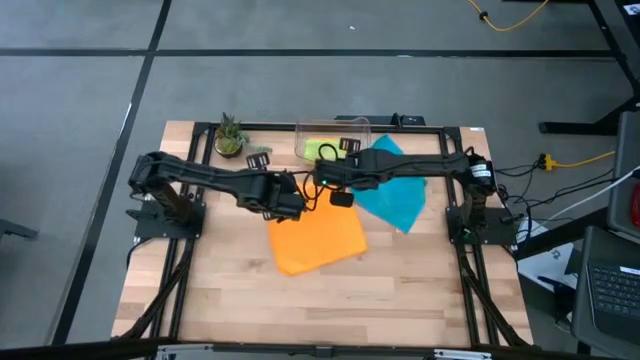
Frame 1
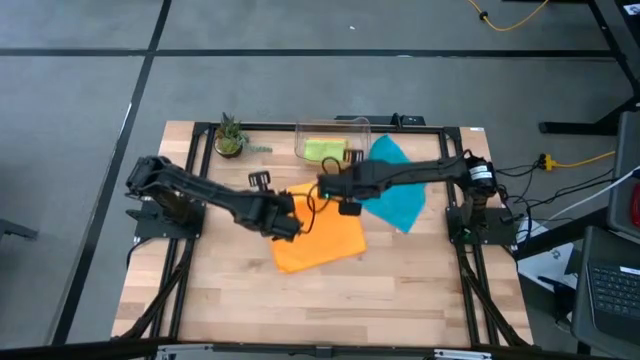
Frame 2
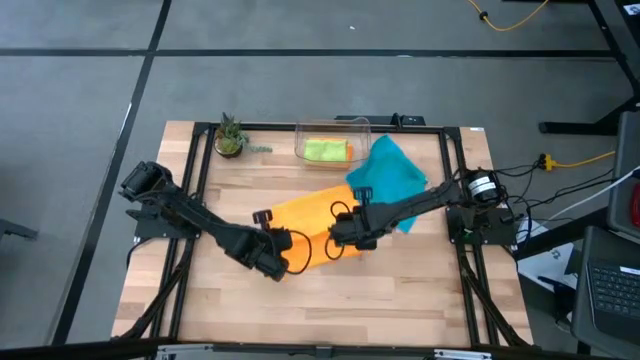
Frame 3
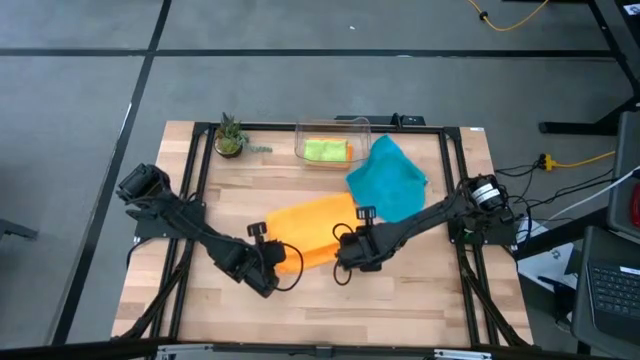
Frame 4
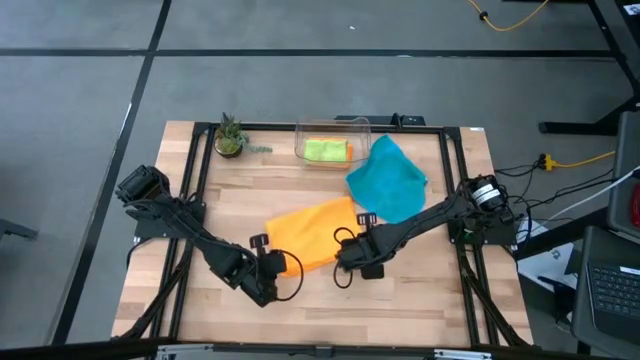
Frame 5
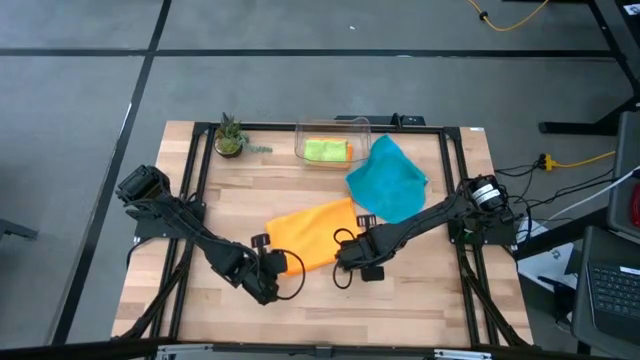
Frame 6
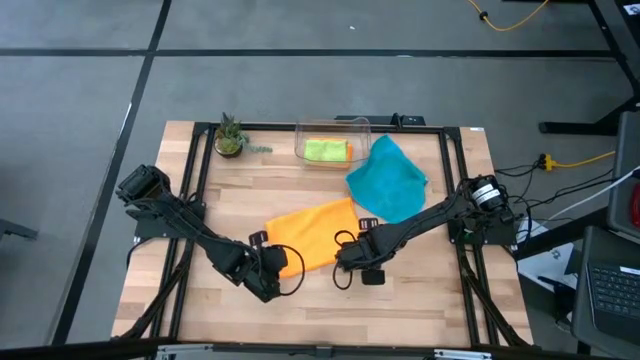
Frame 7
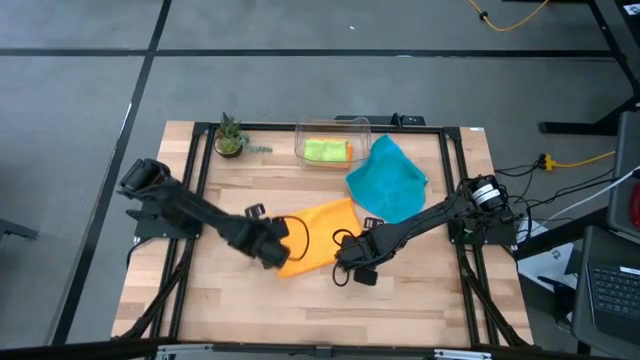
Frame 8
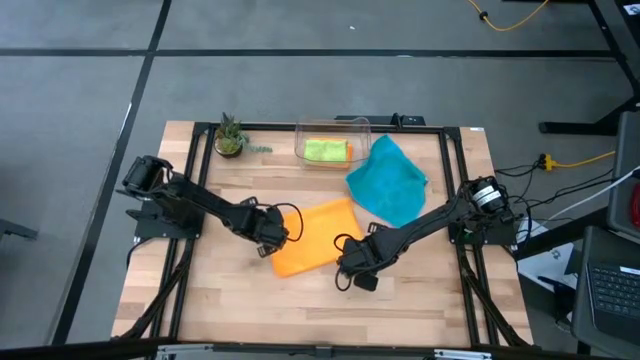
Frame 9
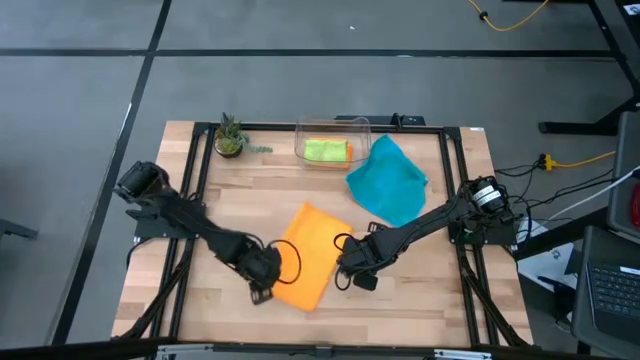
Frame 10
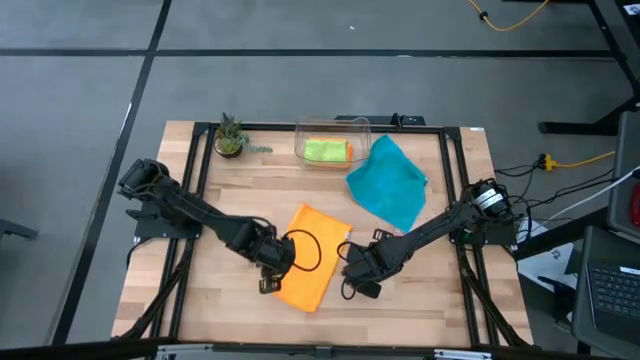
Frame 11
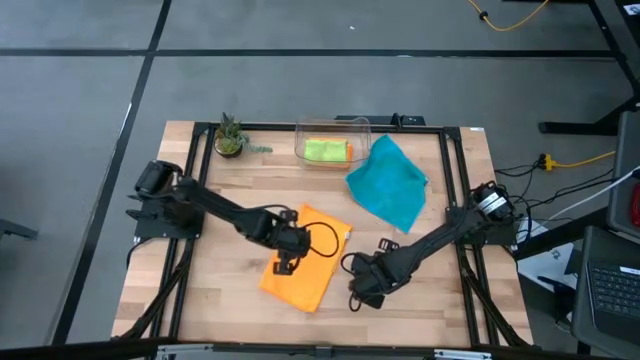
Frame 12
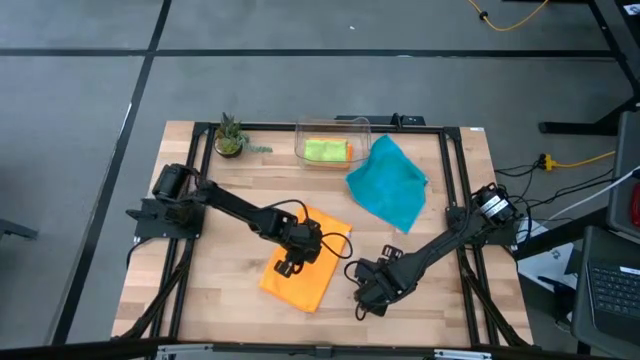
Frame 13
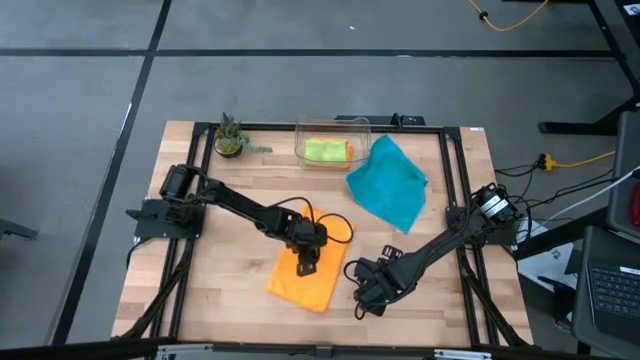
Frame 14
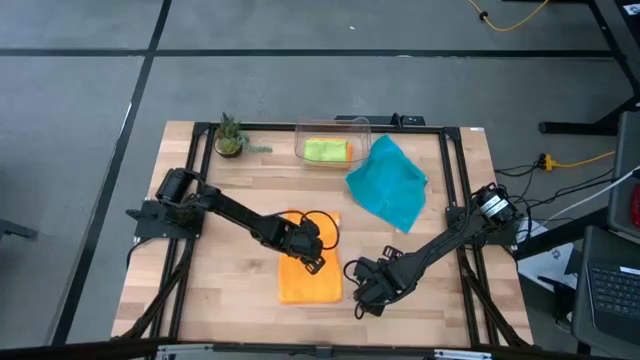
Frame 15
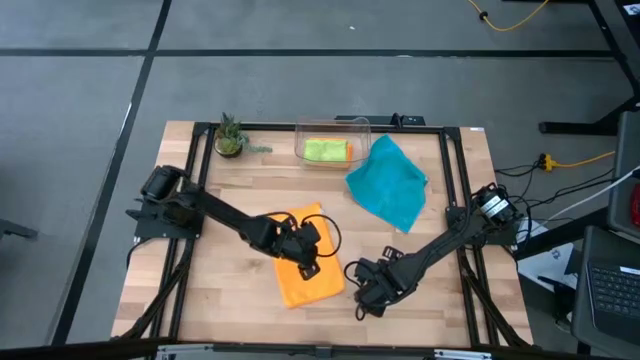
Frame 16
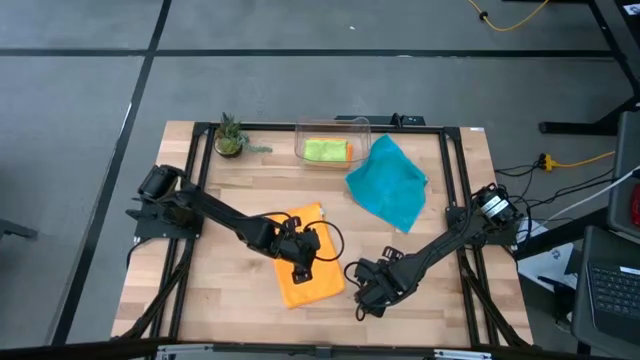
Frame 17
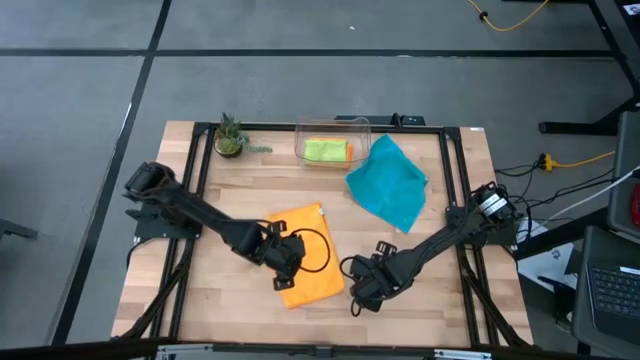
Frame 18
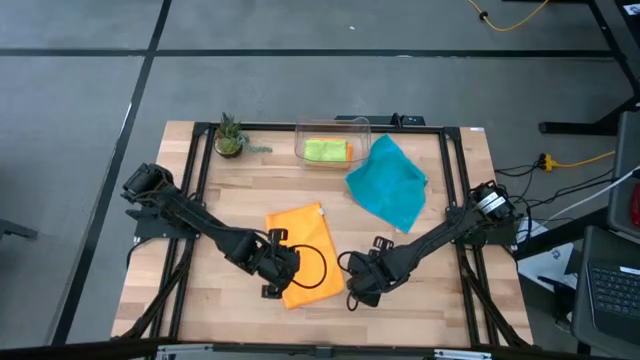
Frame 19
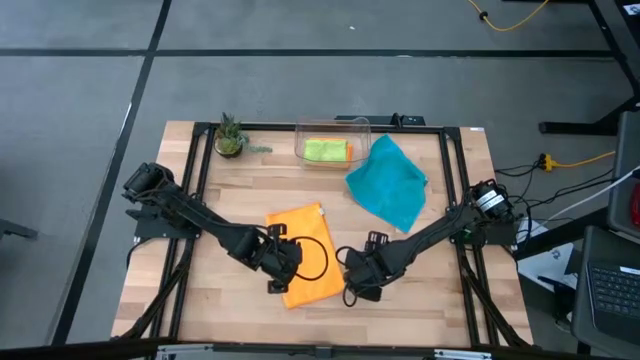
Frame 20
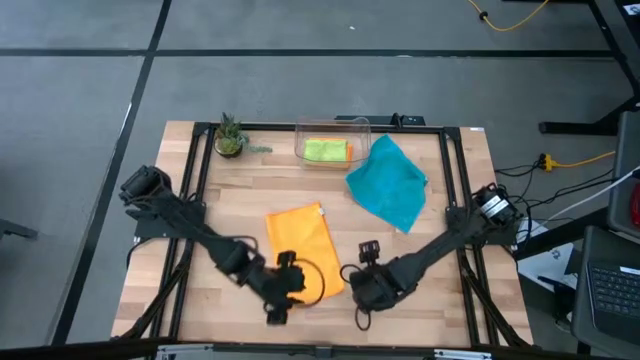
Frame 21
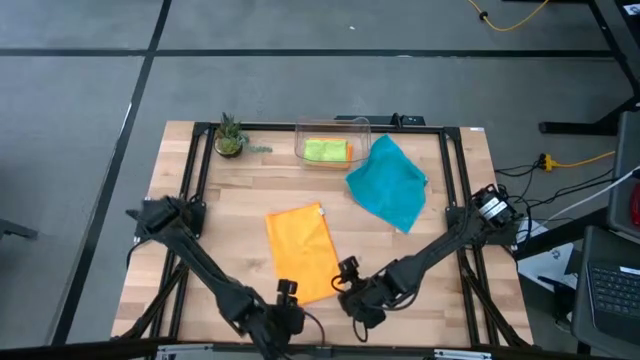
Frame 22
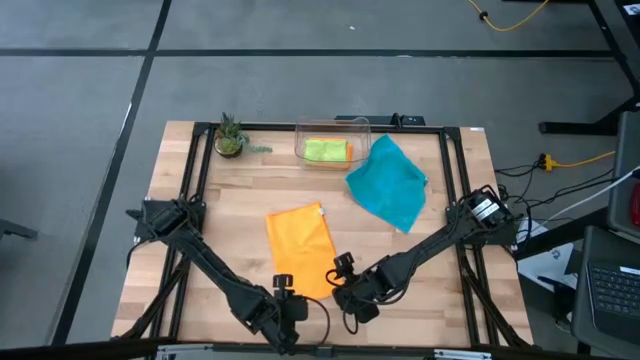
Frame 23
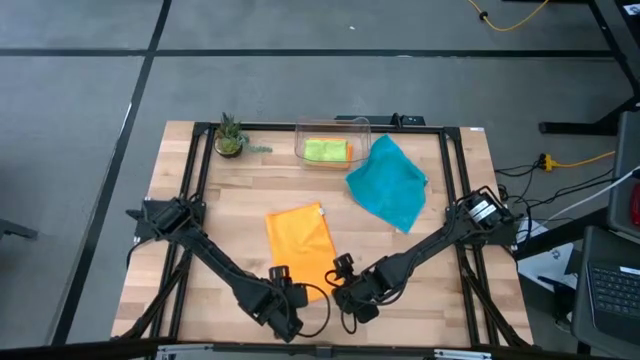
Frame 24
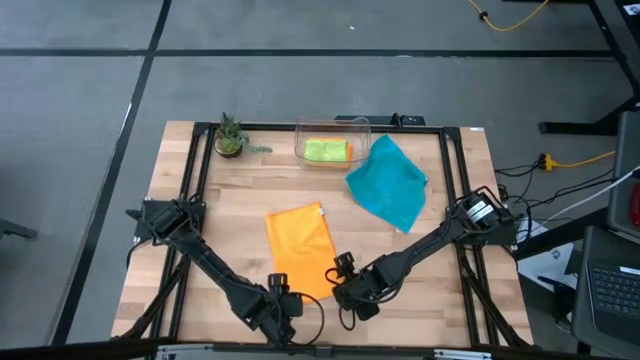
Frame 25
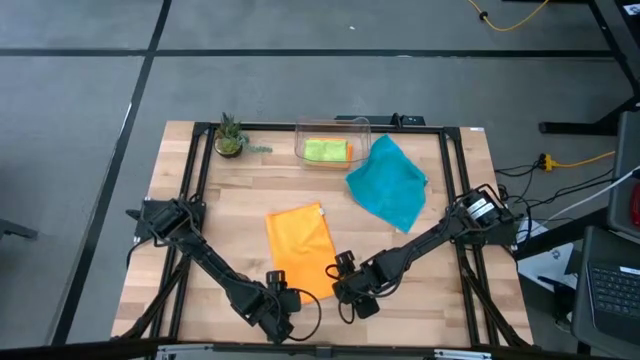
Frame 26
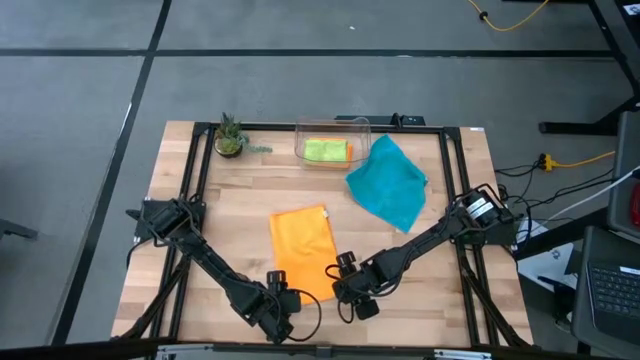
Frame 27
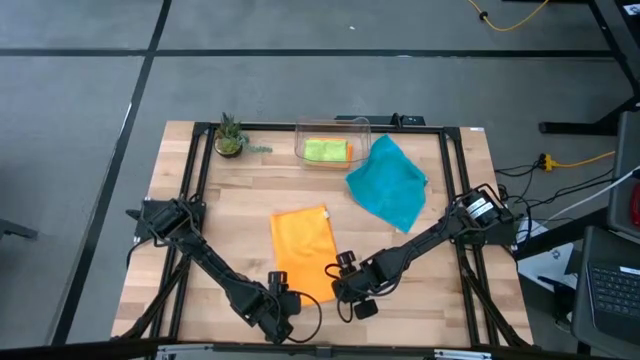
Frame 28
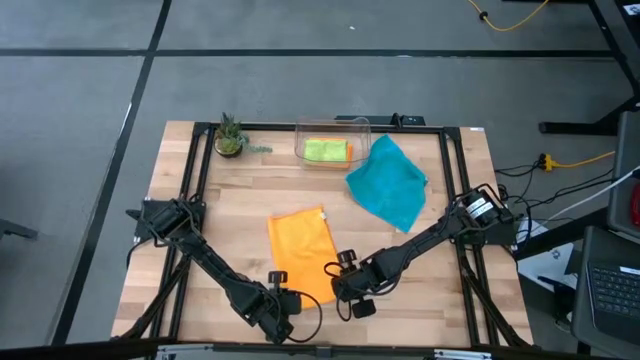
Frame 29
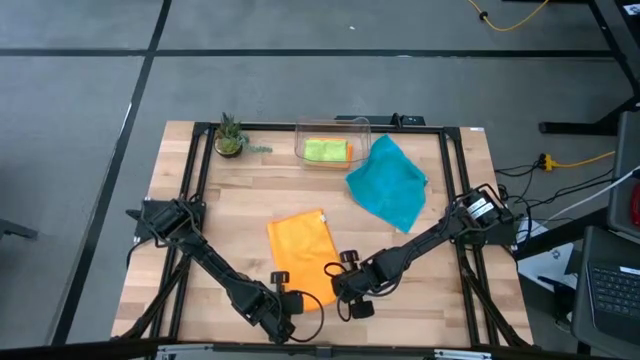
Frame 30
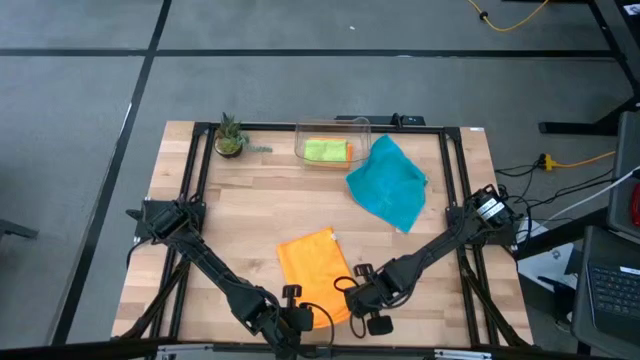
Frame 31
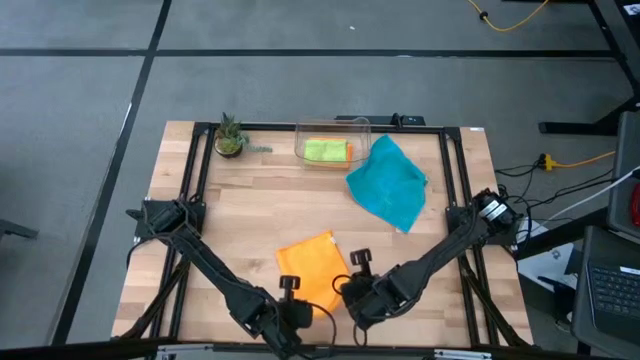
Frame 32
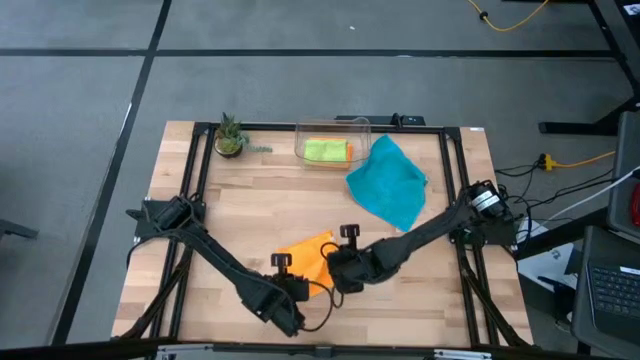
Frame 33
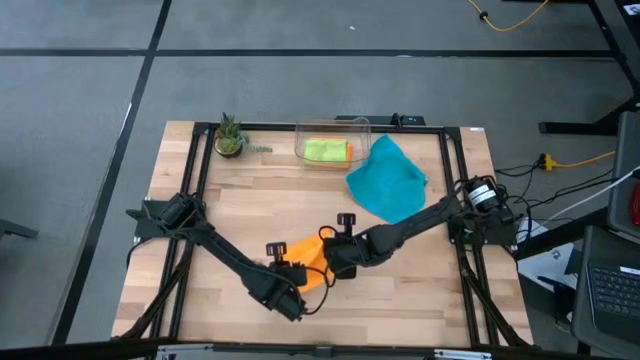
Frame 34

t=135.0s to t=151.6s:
Task: Fold microfiber towels
Fold the orange microfiber cloth

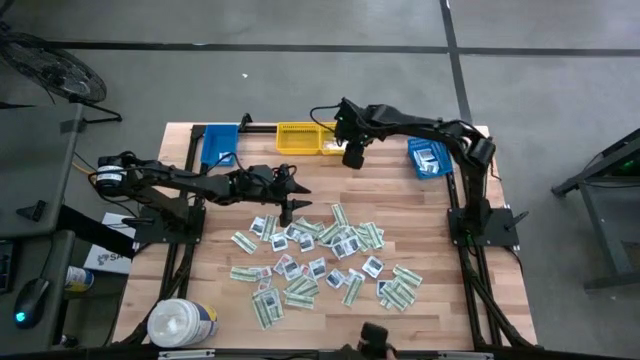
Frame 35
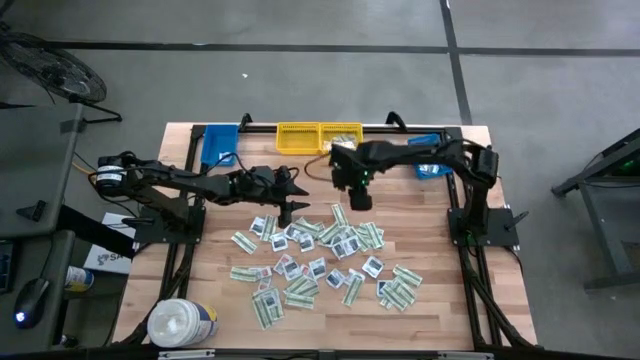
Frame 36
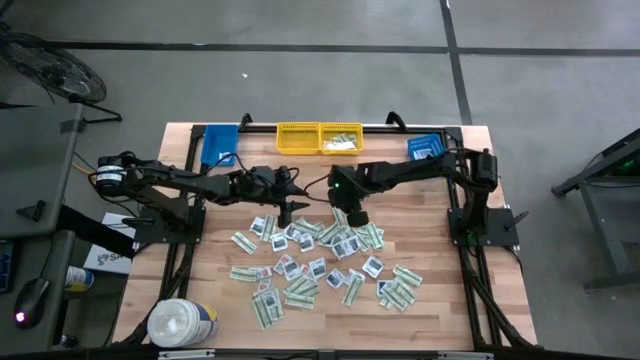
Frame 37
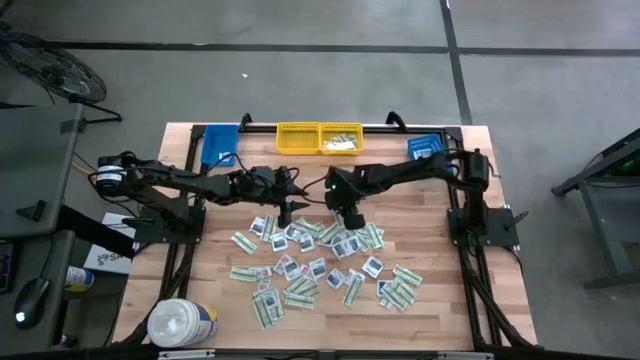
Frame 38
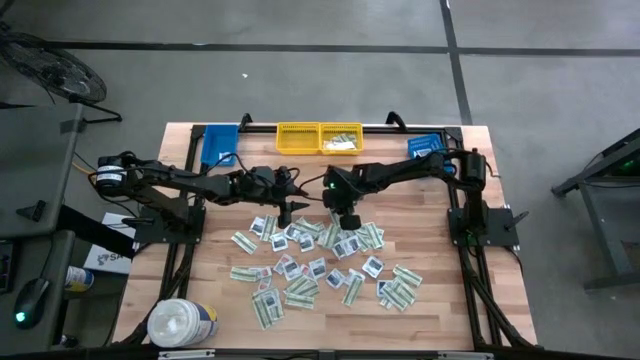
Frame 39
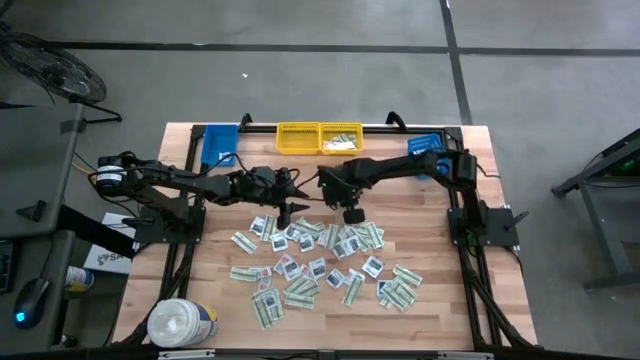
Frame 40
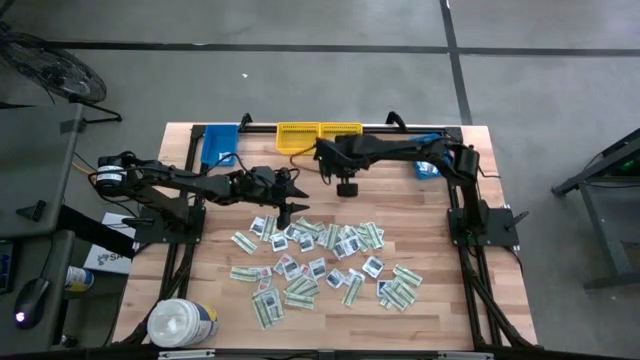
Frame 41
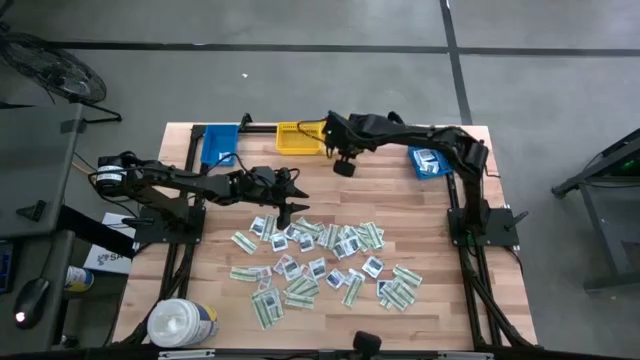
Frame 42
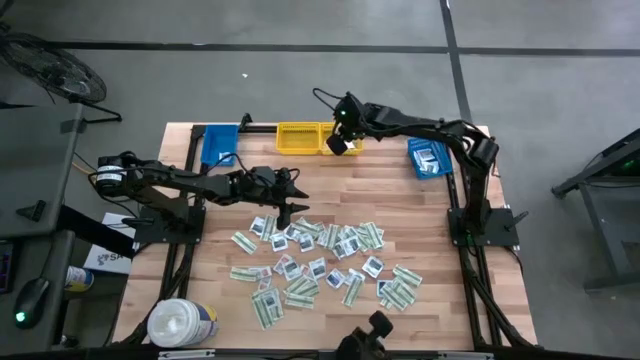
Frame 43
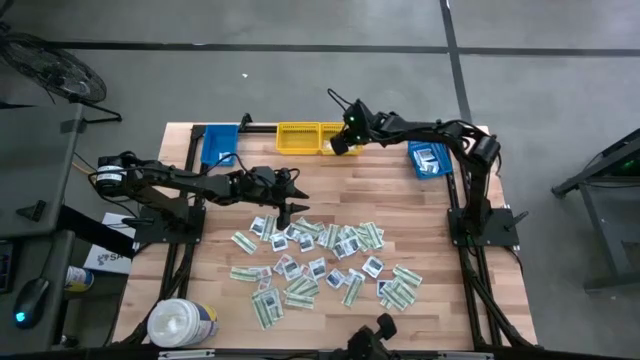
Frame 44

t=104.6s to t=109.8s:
Task: Pick & Place First Aid Supplies
Put the green bandage pack into the right yellow bin
